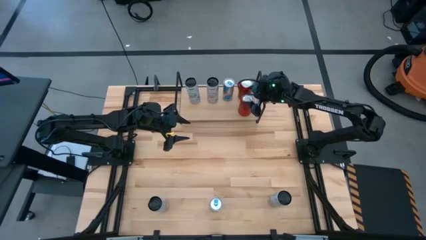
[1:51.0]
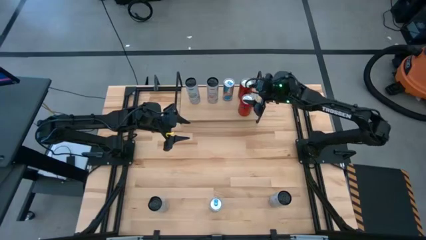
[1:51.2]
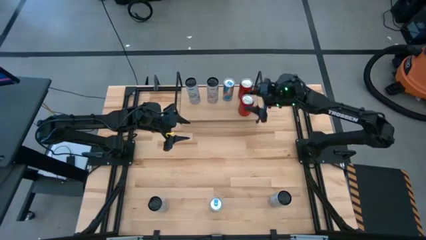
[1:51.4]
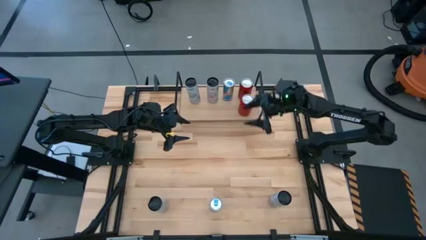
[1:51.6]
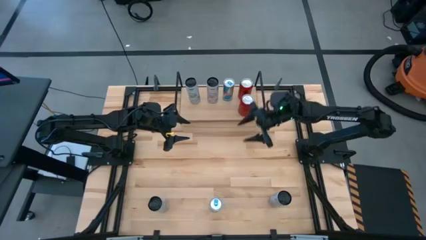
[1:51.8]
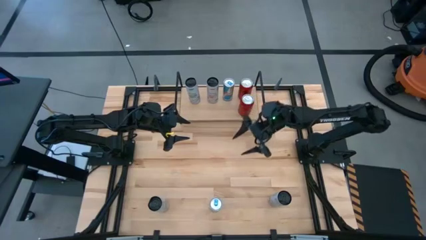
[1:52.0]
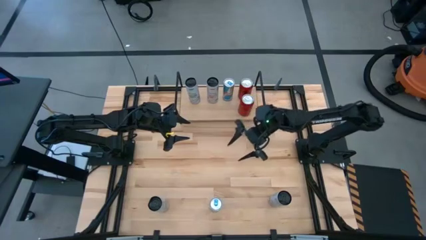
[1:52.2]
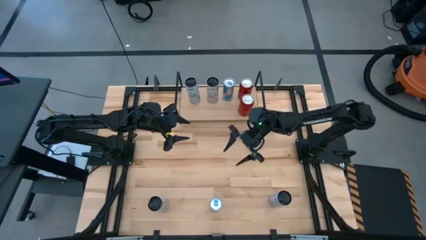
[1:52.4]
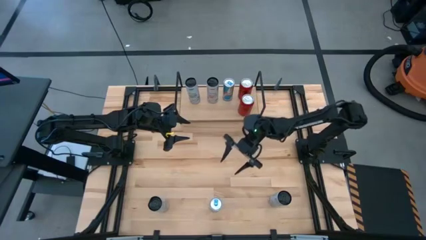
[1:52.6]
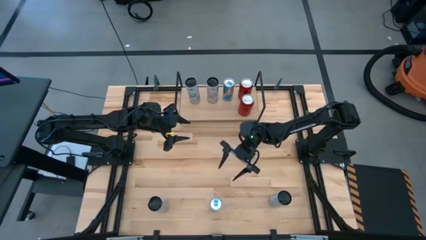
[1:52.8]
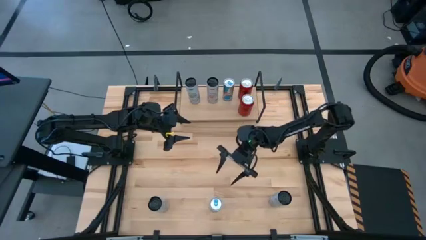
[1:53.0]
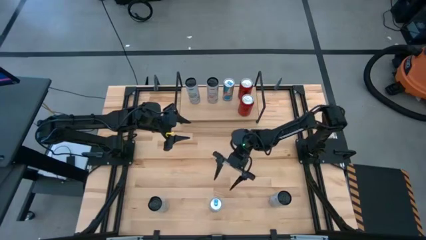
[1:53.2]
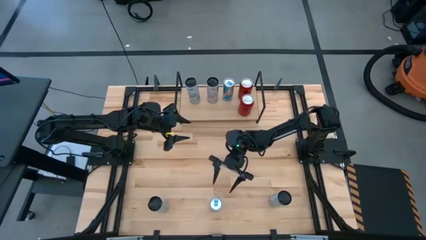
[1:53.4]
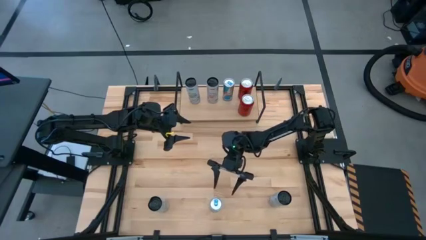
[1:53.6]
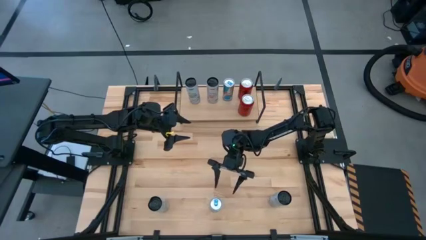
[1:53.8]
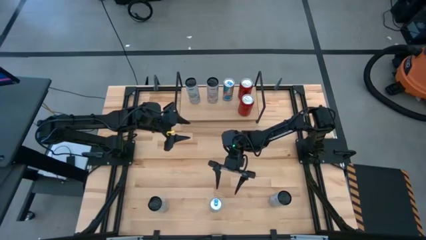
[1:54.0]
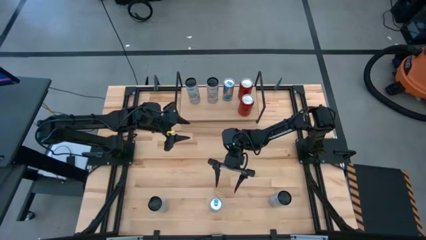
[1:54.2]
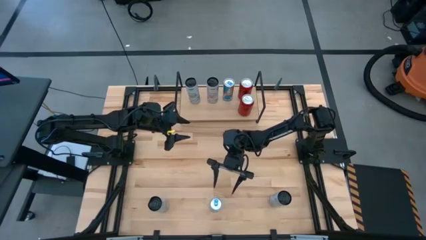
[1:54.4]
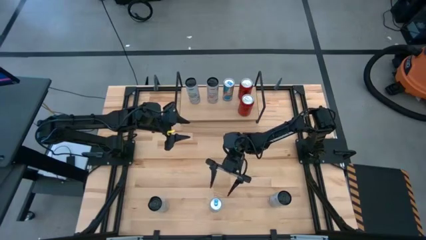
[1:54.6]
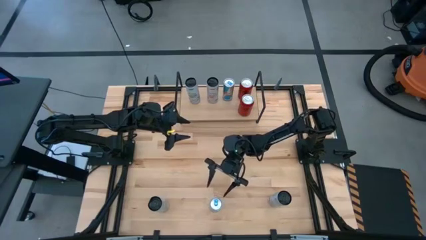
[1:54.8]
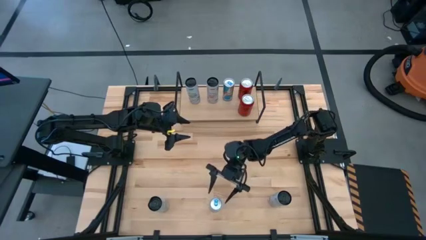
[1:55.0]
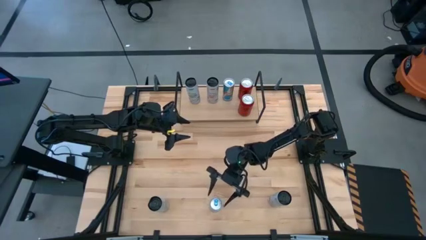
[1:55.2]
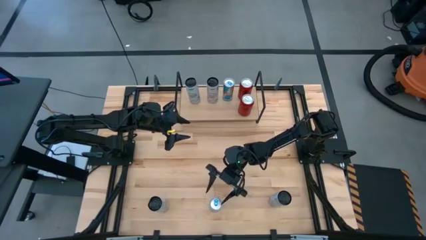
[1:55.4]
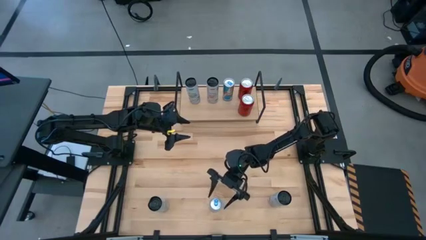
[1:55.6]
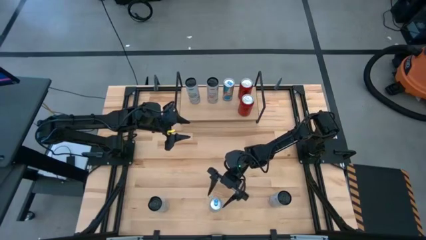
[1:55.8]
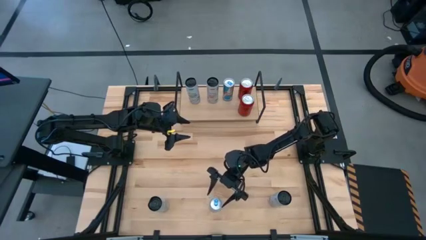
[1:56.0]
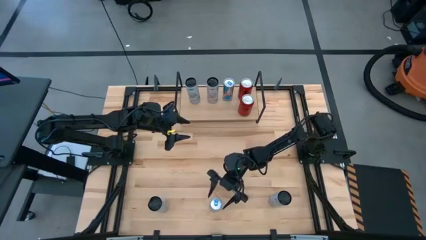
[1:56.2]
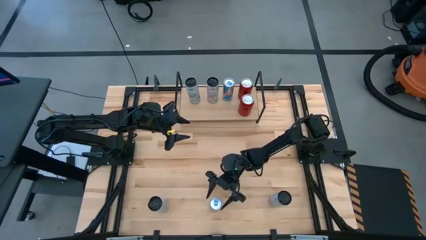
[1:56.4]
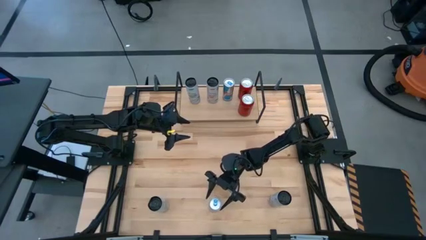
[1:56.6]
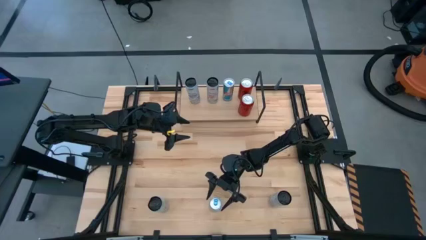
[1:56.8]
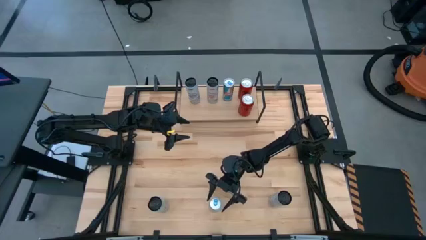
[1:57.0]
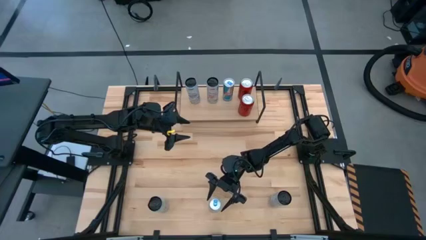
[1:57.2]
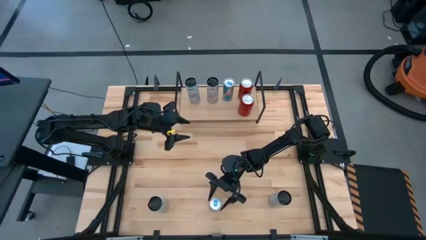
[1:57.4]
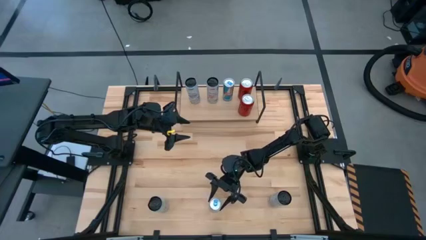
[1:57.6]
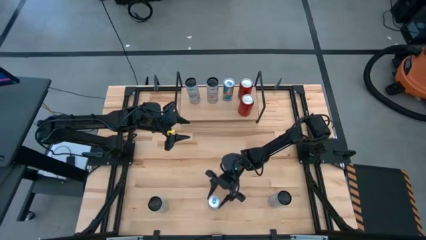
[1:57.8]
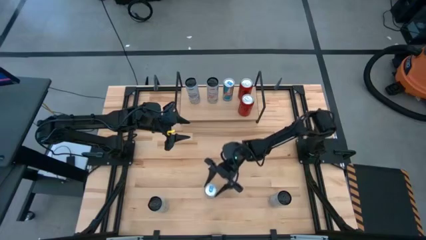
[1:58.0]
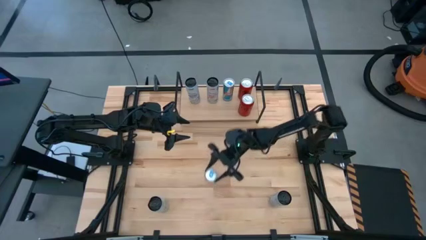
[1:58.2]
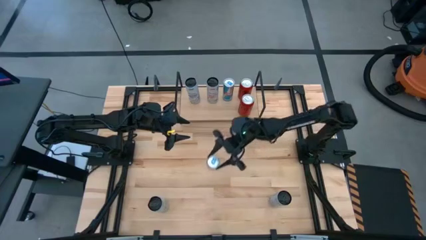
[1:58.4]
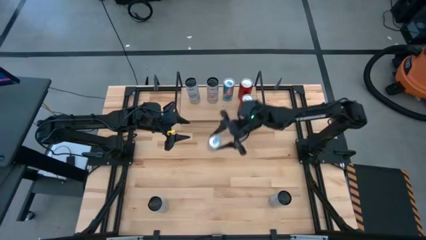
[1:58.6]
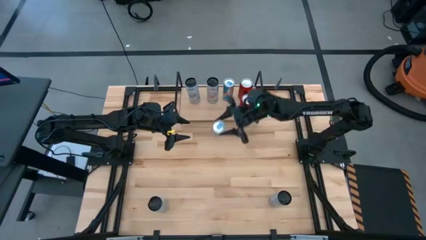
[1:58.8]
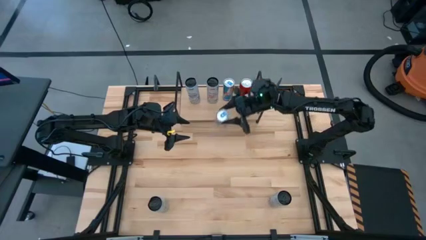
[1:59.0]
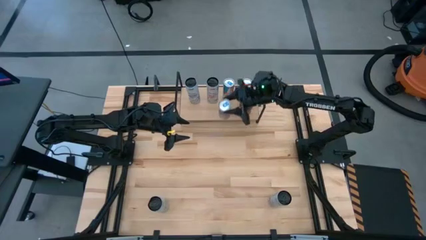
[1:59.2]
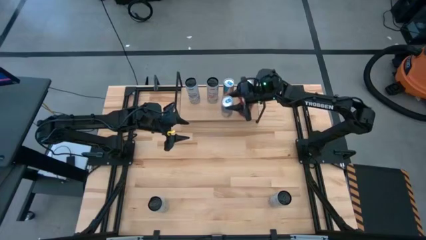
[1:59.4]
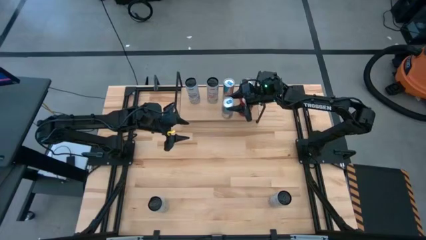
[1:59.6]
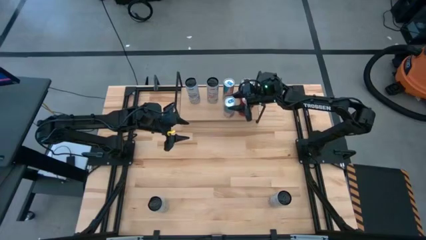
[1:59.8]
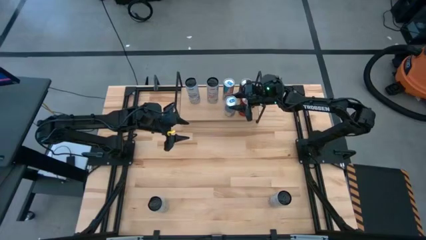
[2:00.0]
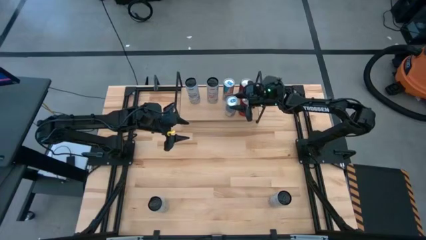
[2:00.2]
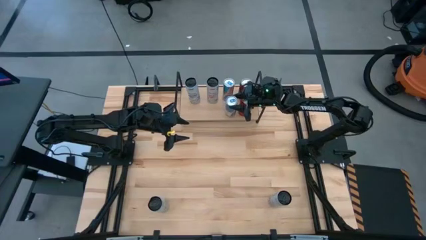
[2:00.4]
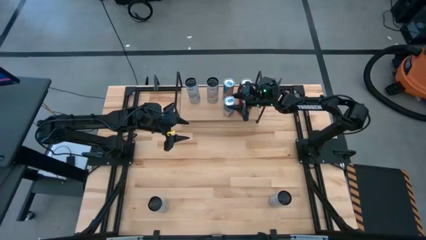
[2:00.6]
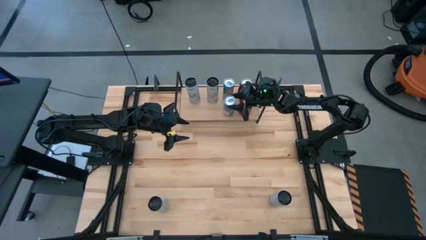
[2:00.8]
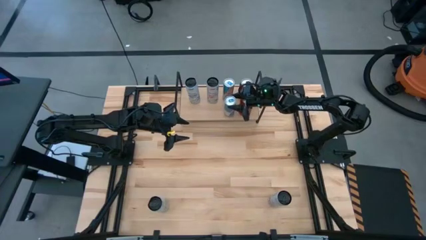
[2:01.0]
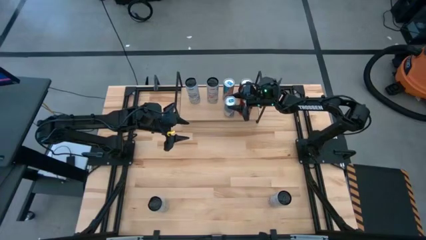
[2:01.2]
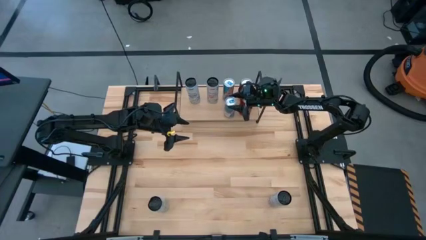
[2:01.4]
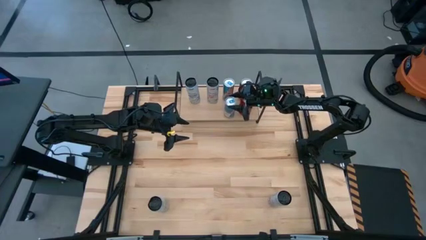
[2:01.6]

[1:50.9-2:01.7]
Task: Place canned beverage on shelf
Put the blue soda can on the shelf aligned with the other blue soda can

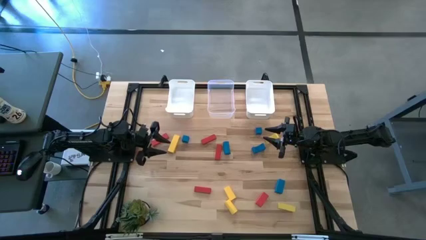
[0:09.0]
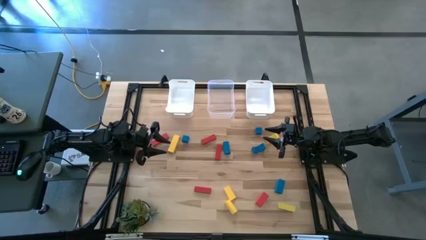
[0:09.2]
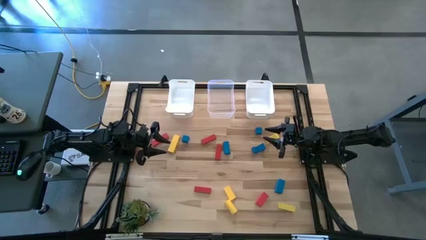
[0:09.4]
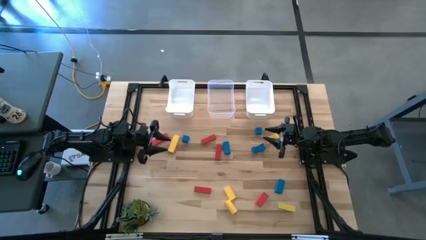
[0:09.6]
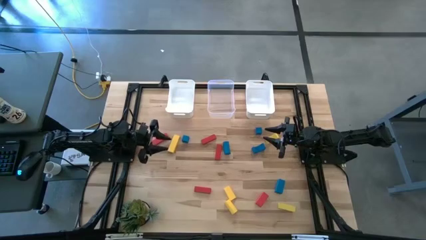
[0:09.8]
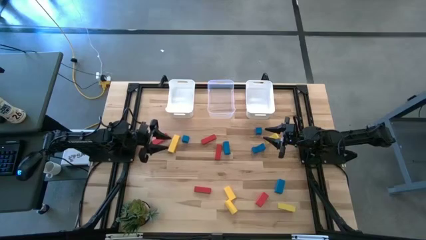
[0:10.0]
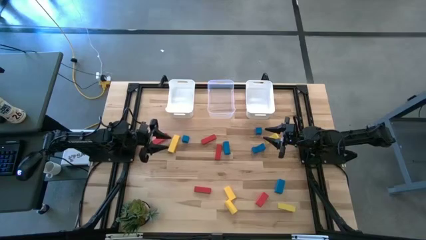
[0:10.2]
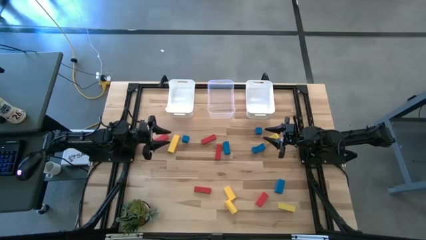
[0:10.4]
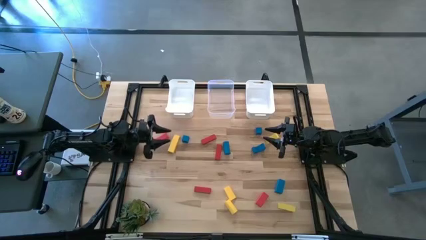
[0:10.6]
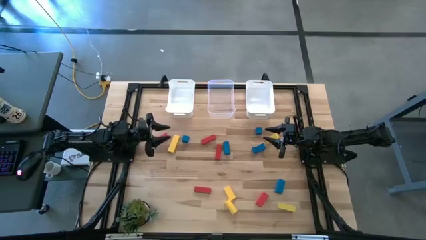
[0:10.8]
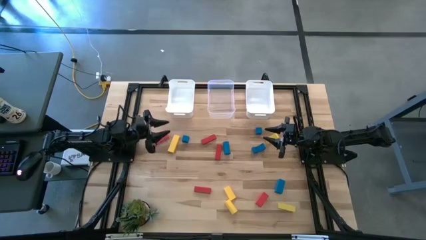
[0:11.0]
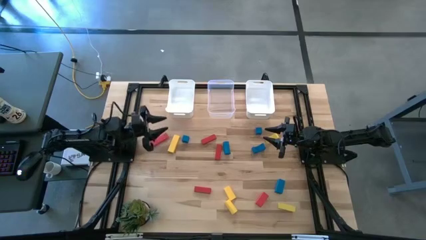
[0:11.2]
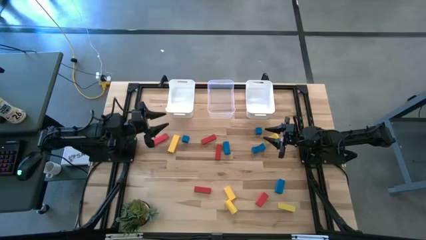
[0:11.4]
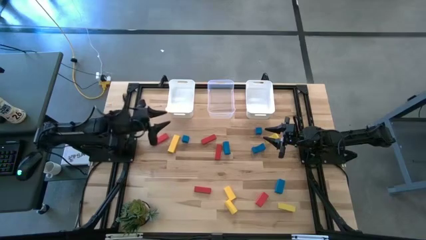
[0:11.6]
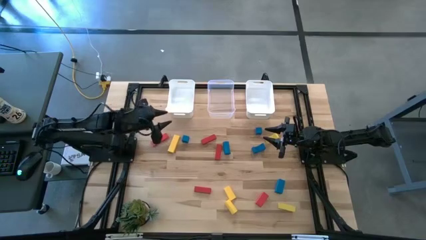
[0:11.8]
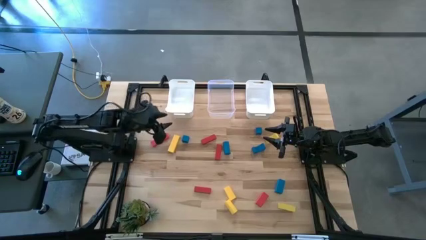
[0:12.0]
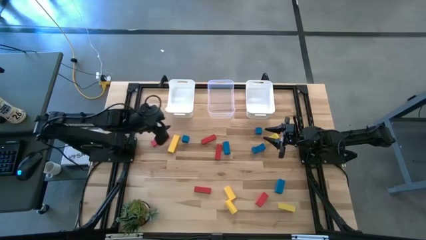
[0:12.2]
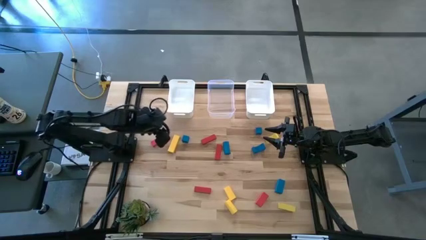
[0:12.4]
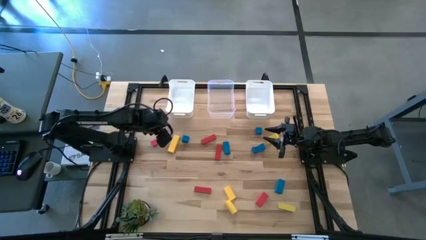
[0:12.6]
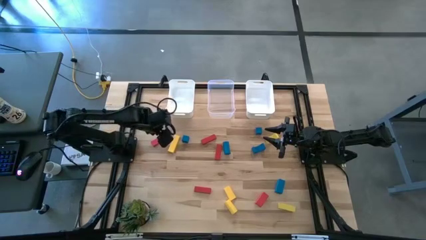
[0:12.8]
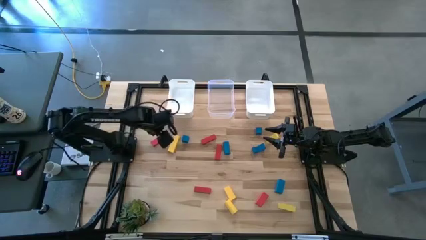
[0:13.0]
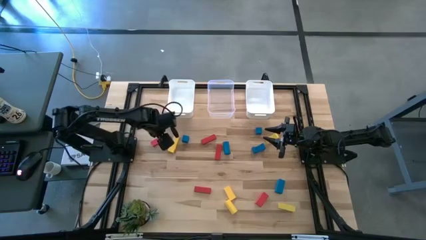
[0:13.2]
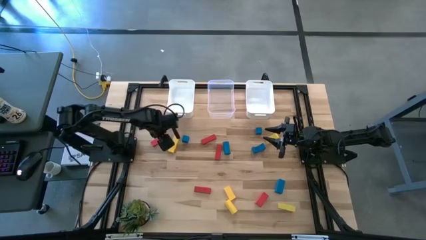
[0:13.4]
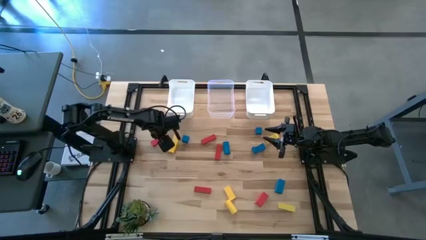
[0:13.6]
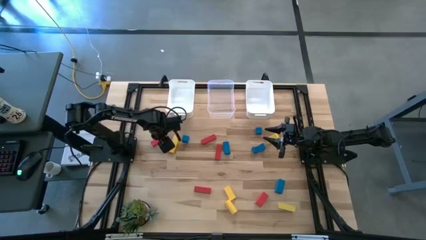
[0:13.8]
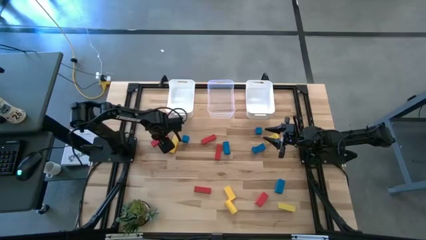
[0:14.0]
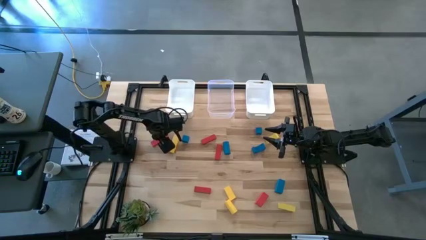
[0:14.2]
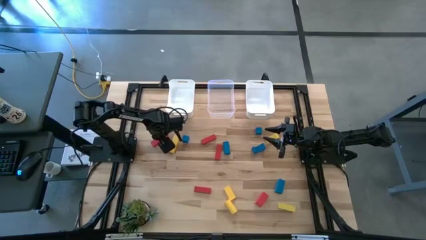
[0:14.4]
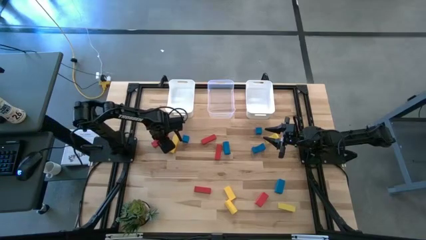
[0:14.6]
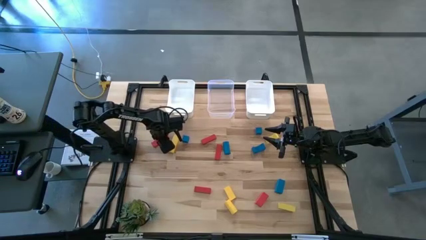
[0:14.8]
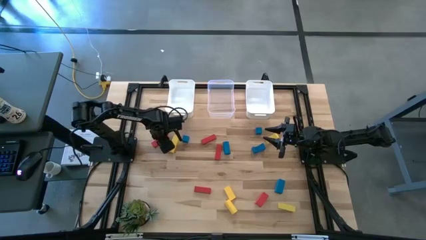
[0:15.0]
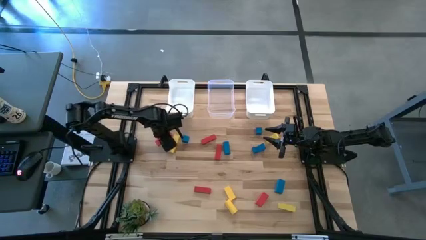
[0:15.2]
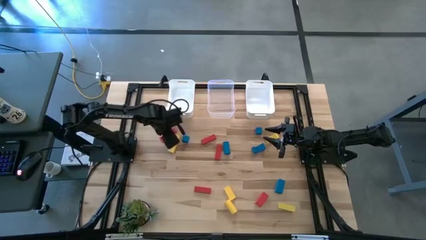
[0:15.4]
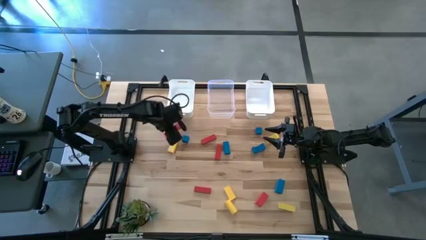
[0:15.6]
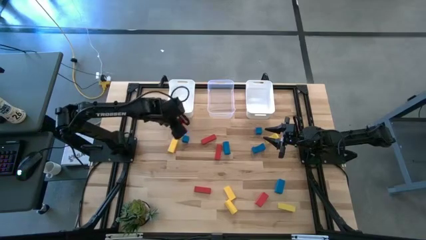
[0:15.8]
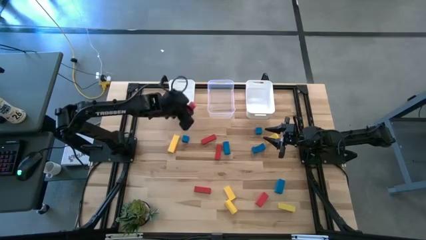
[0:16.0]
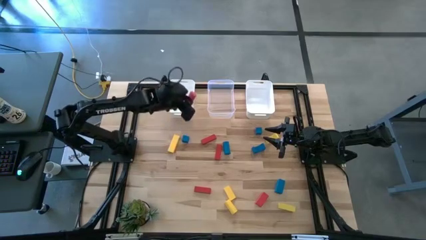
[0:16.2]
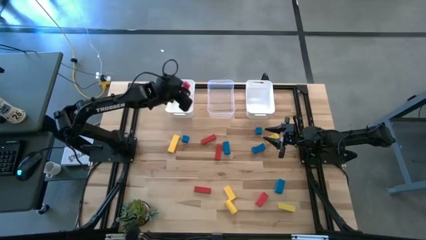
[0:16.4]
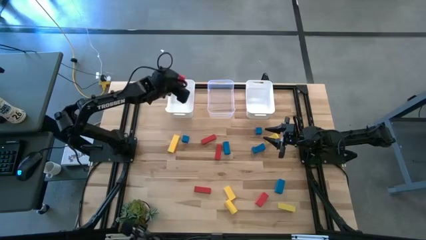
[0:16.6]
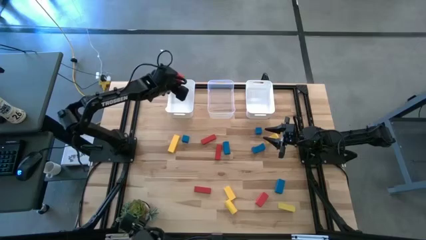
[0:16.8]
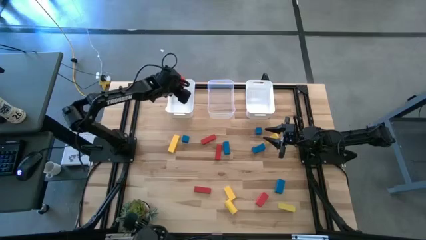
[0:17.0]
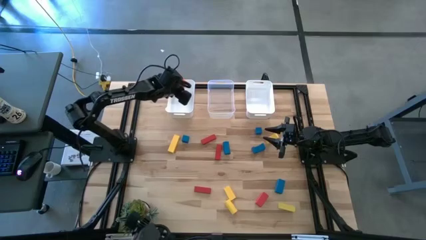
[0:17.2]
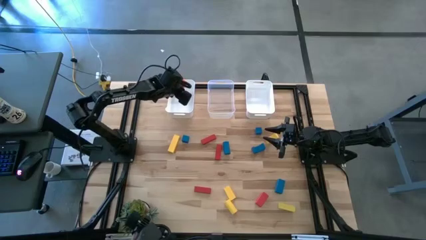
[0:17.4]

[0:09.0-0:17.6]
Task: Sort & place blocks by color
Put the red block into the left white bin
